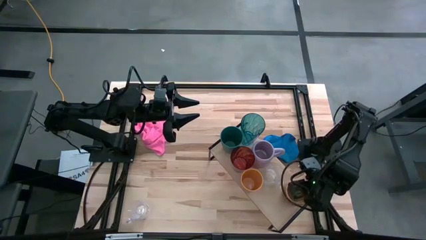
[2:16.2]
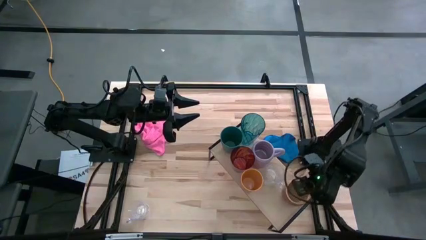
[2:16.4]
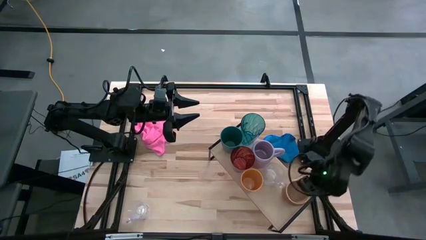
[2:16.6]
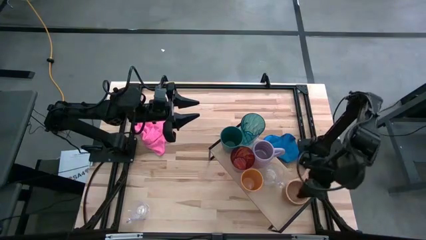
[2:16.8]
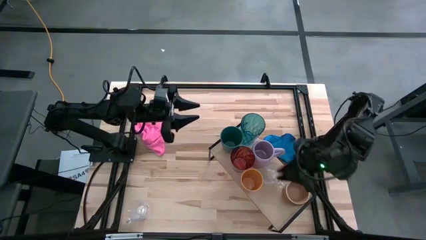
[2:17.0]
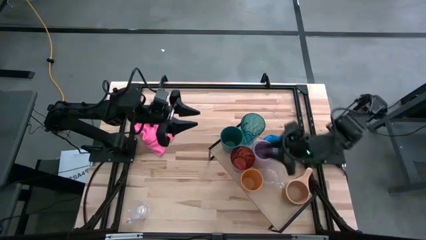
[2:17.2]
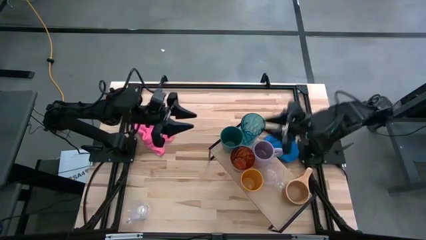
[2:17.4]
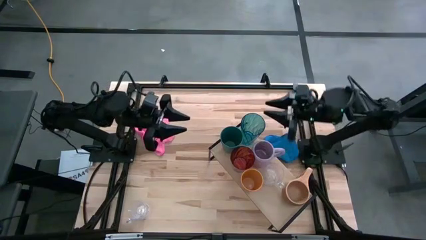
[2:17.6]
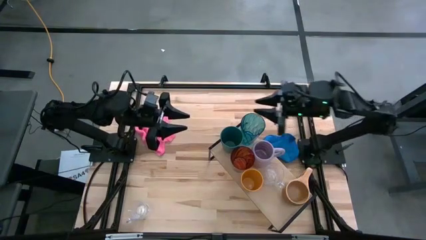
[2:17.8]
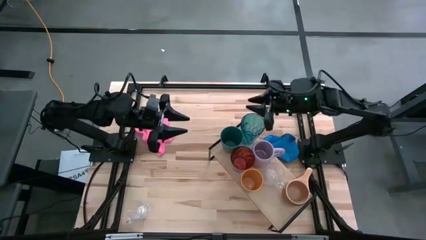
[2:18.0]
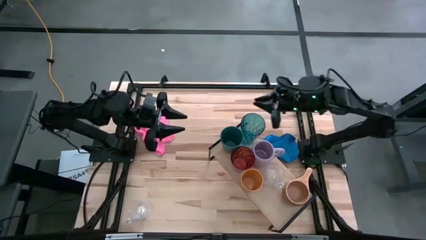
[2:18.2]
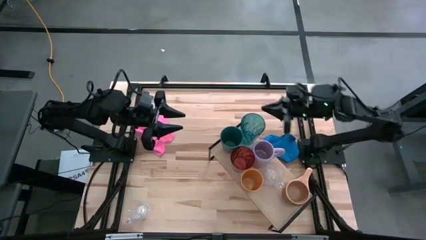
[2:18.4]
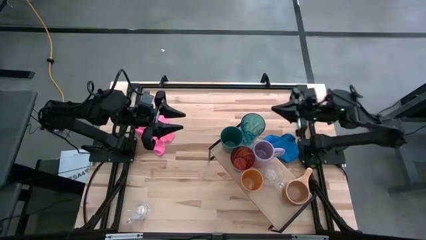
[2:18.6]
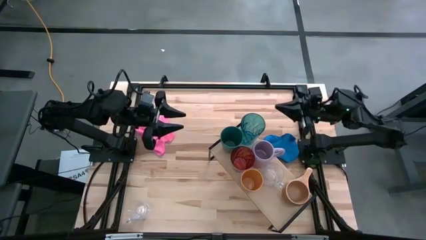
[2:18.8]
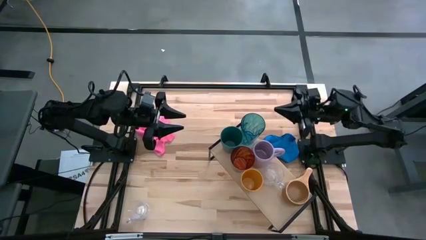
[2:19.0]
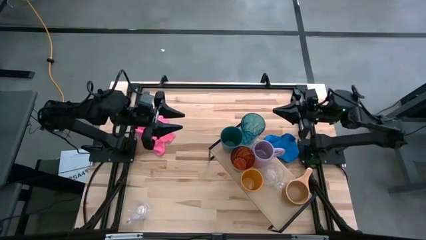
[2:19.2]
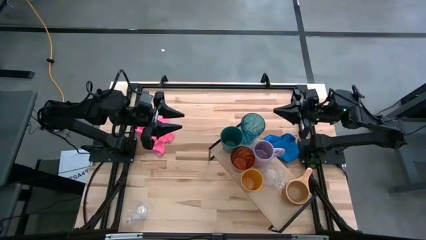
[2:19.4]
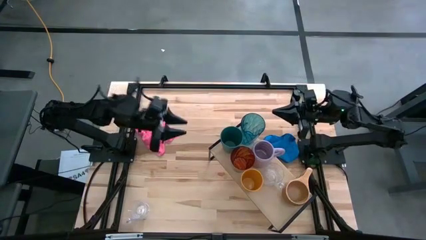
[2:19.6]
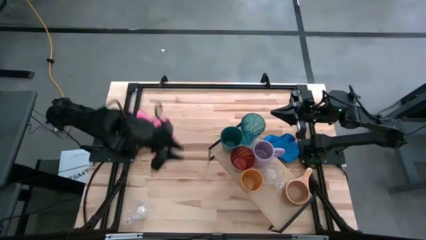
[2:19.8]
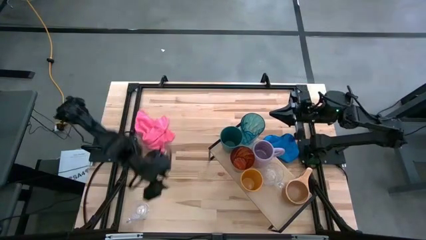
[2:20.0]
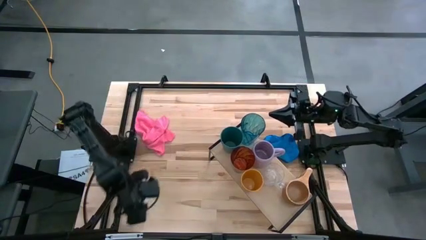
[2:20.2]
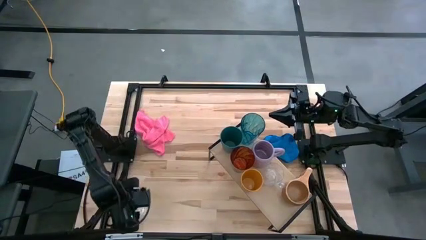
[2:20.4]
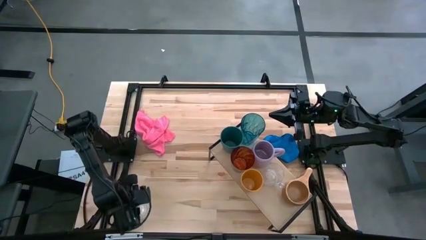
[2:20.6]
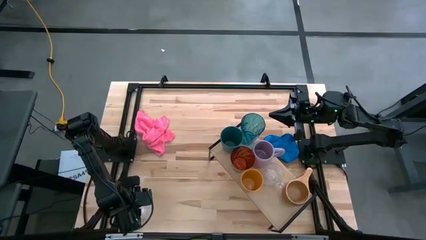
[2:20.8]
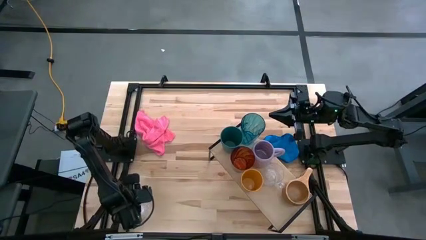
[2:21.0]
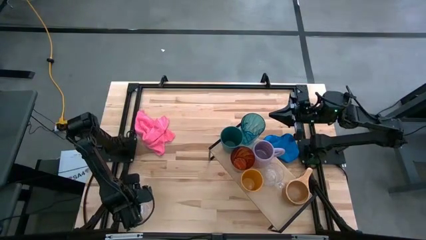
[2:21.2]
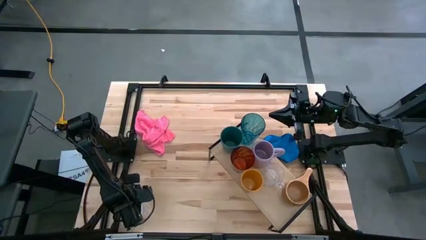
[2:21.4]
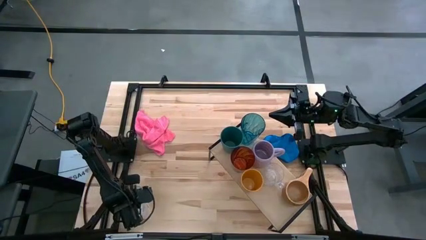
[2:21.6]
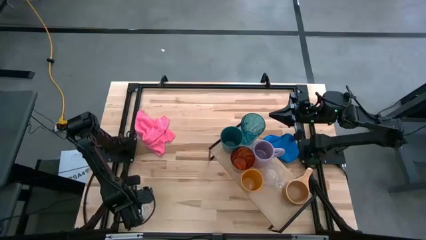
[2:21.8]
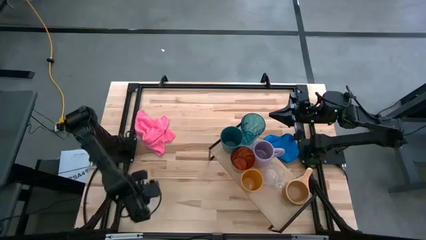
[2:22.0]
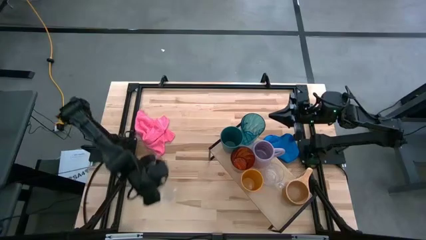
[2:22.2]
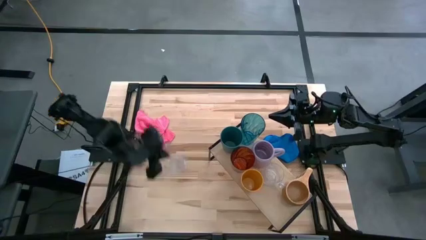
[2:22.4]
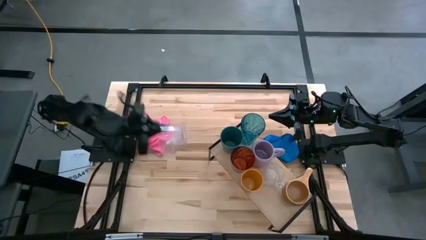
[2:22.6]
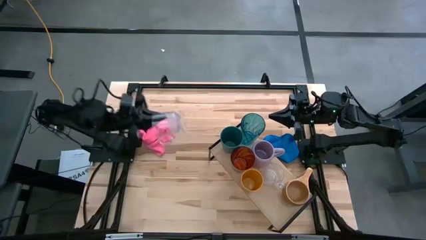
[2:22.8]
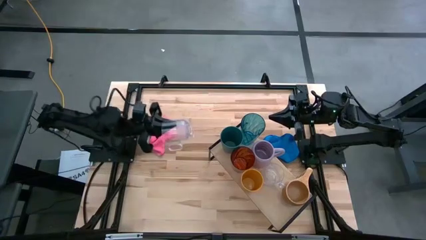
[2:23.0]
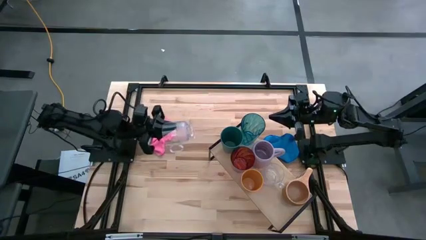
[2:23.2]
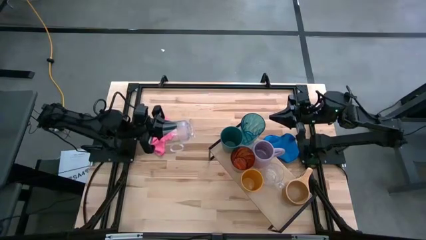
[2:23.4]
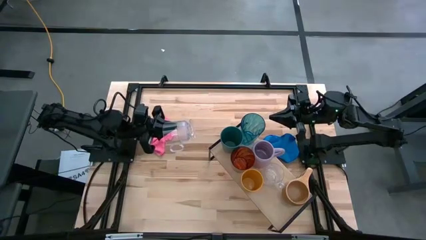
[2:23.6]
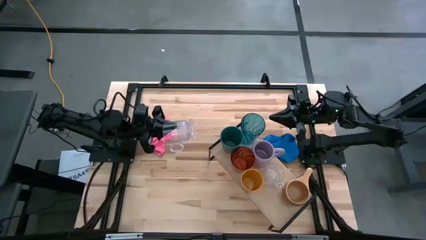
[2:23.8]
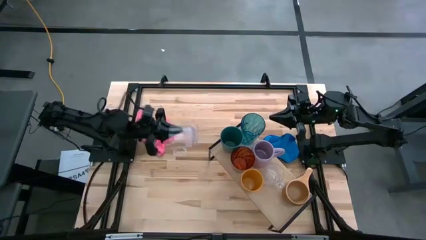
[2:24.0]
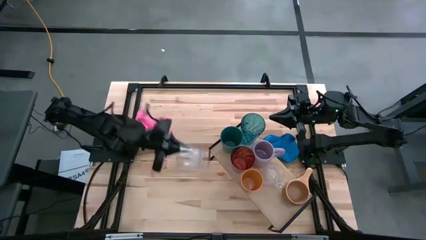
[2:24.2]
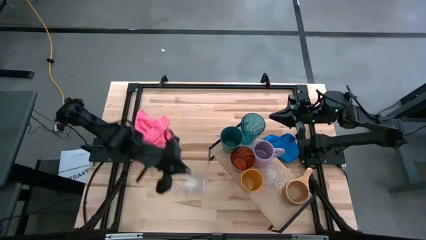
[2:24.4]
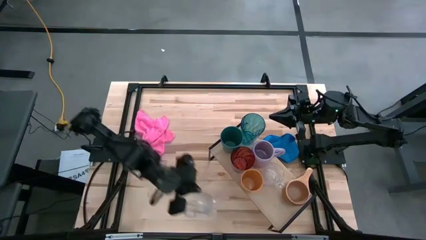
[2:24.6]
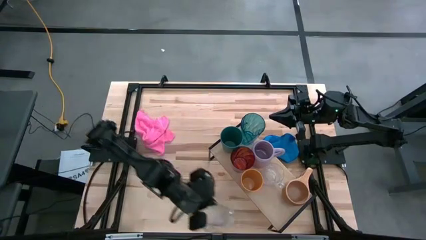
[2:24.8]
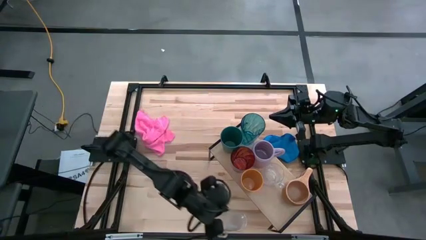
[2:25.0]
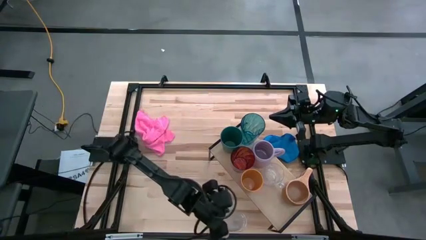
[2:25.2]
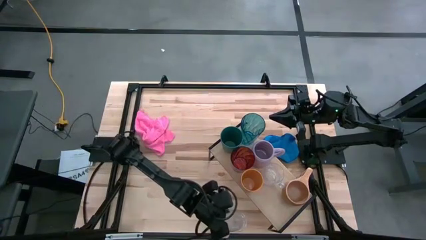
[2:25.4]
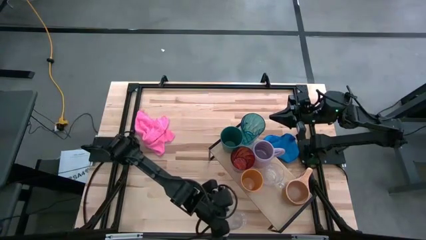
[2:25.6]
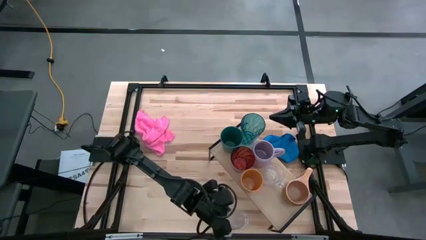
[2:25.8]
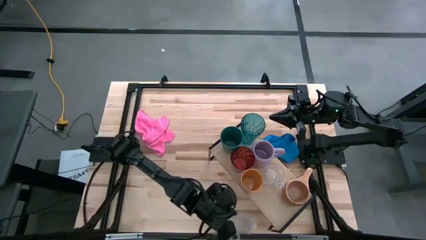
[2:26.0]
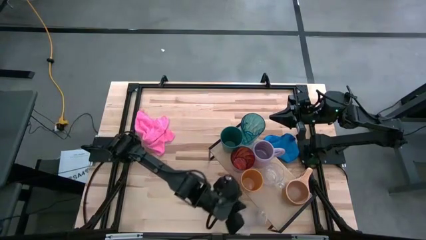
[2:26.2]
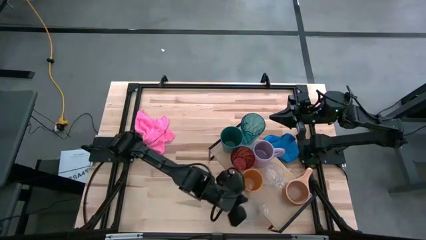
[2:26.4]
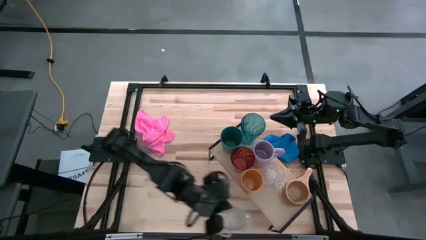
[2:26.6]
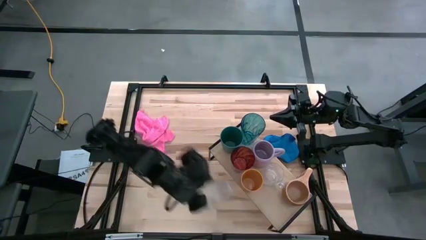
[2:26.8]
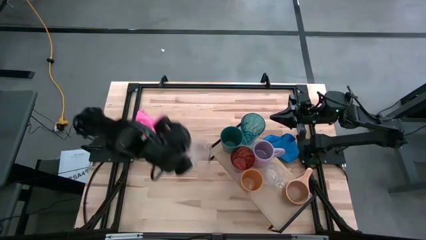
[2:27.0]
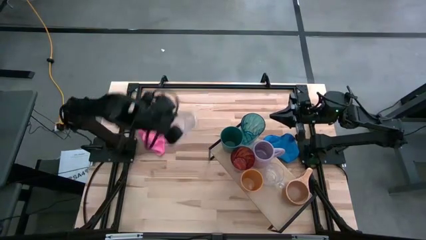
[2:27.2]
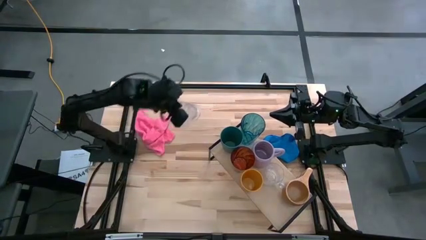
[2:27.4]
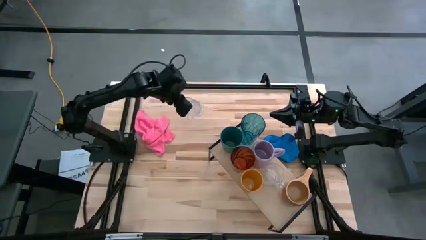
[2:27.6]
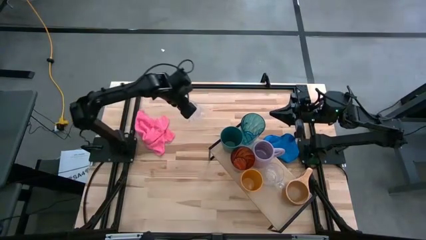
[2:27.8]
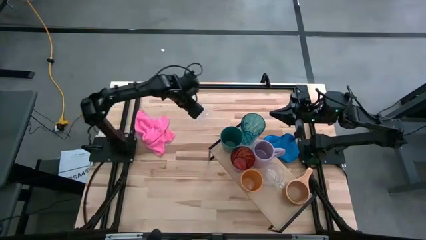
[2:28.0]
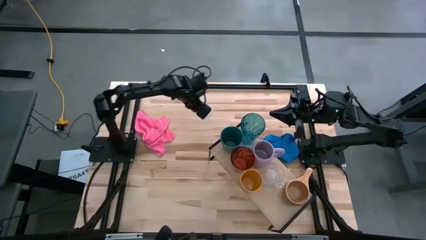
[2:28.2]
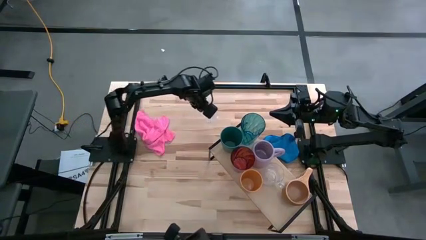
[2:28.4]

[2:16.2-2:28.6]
Task: Stack small to large cups/mugs on shelf
Put the transparent mug on the shelf
